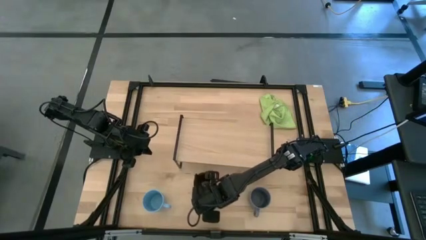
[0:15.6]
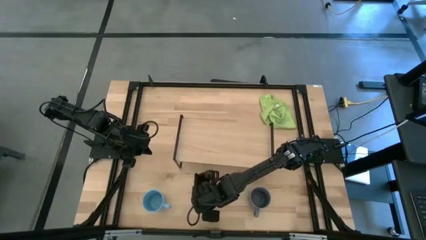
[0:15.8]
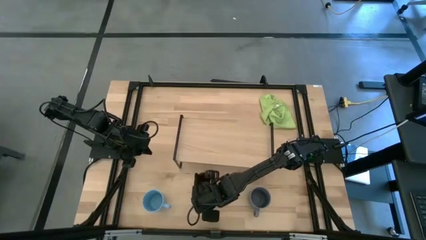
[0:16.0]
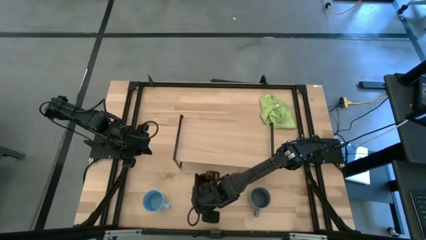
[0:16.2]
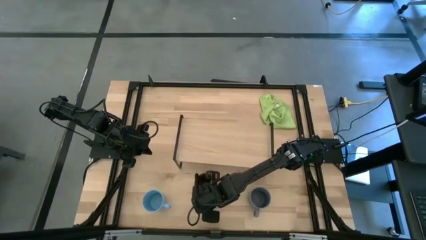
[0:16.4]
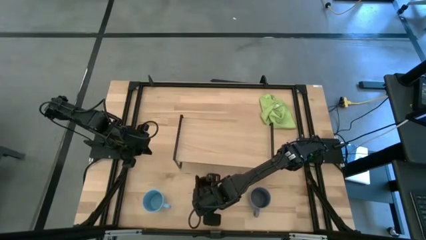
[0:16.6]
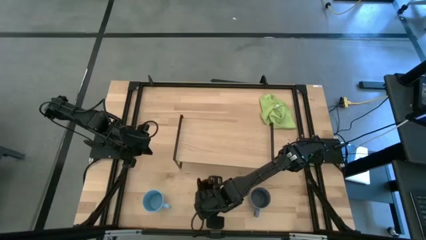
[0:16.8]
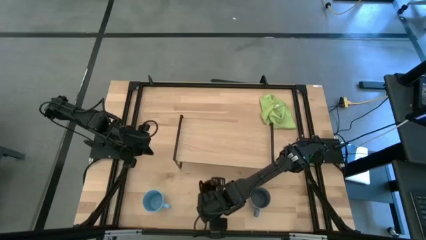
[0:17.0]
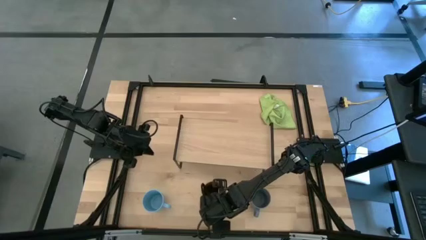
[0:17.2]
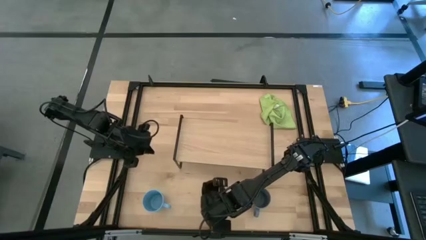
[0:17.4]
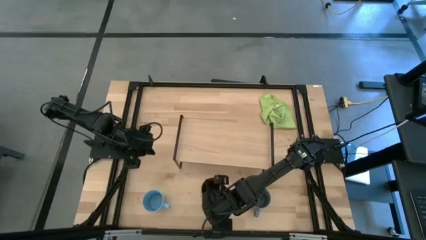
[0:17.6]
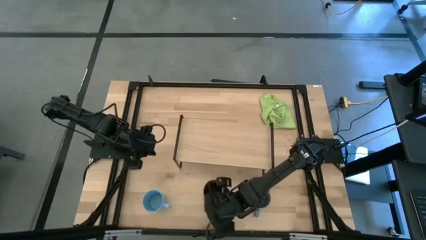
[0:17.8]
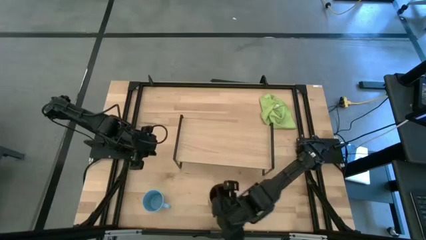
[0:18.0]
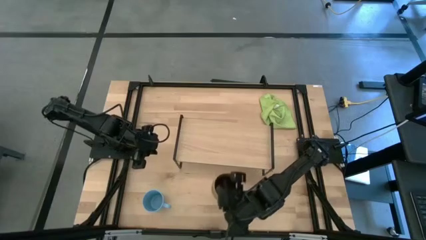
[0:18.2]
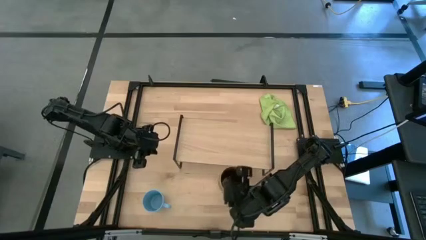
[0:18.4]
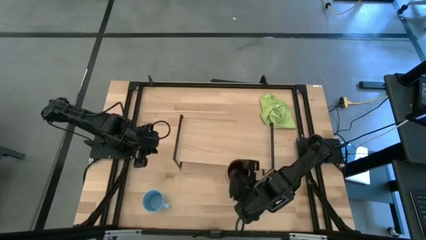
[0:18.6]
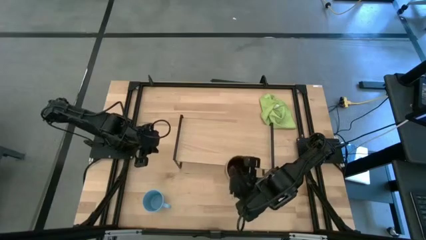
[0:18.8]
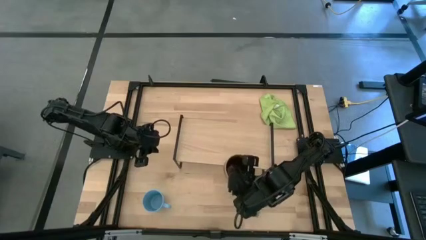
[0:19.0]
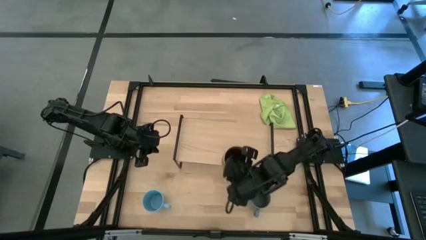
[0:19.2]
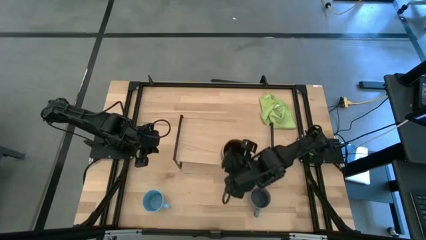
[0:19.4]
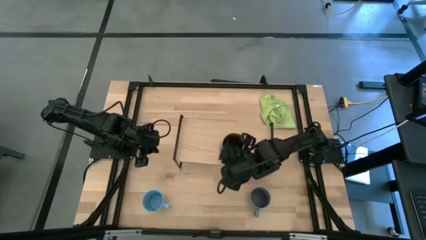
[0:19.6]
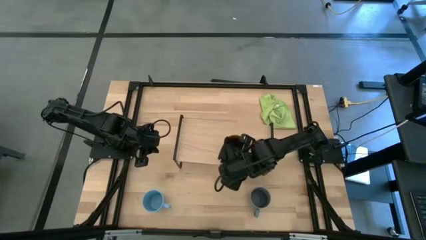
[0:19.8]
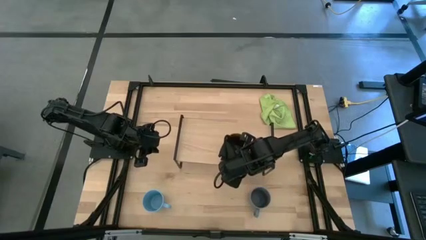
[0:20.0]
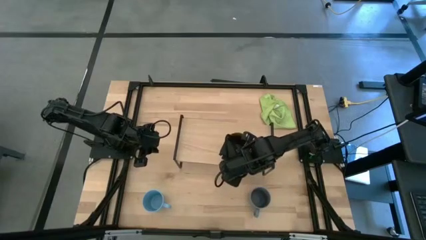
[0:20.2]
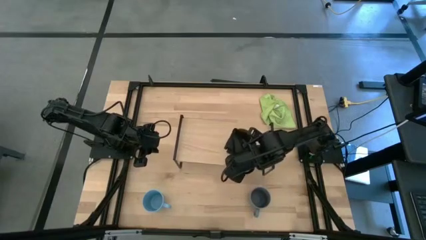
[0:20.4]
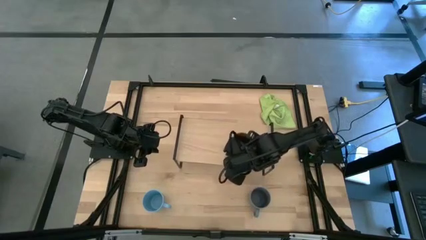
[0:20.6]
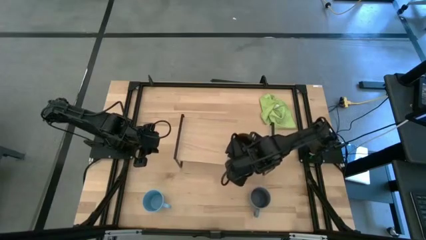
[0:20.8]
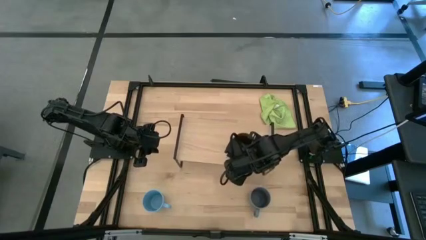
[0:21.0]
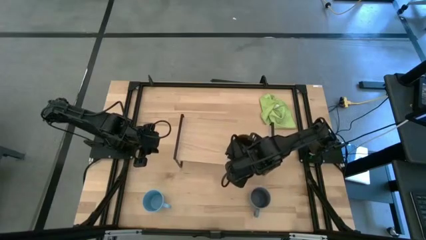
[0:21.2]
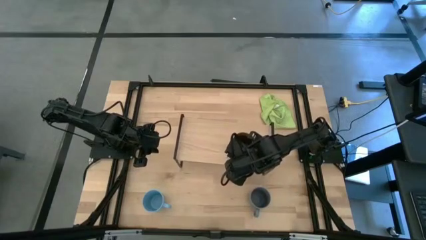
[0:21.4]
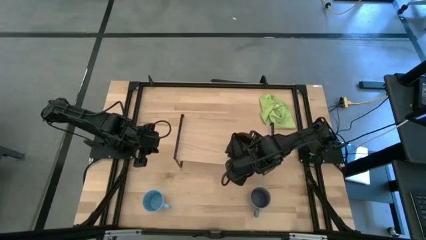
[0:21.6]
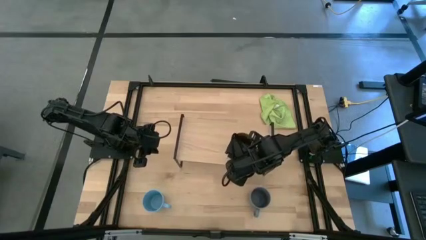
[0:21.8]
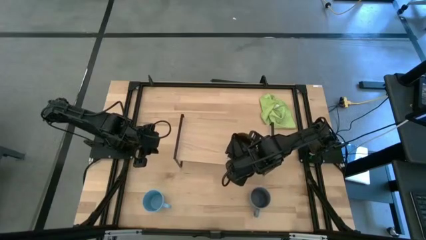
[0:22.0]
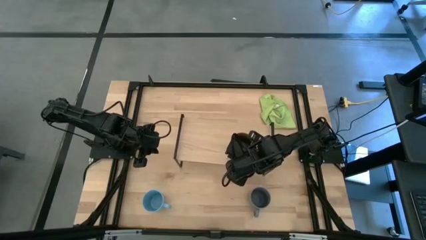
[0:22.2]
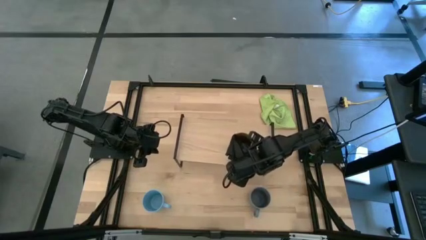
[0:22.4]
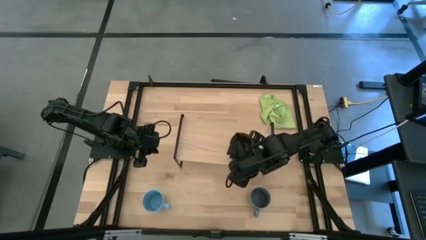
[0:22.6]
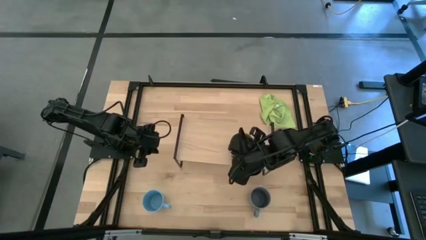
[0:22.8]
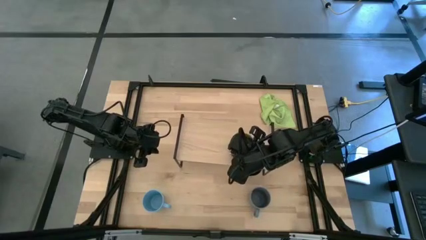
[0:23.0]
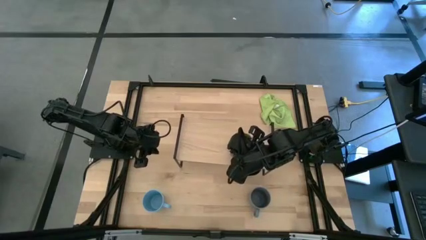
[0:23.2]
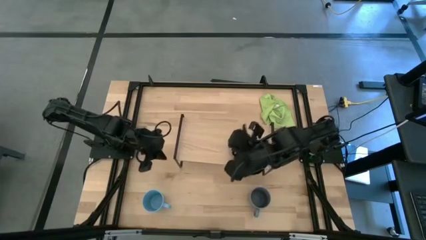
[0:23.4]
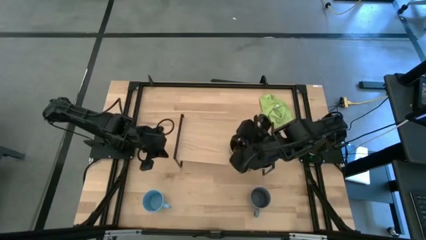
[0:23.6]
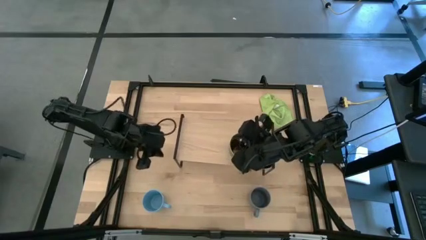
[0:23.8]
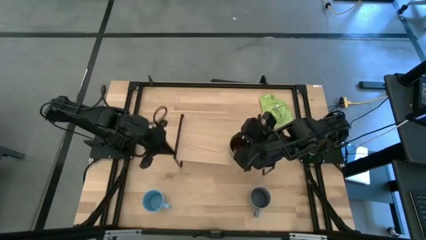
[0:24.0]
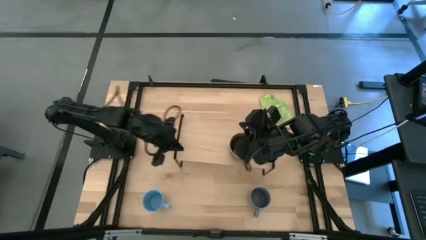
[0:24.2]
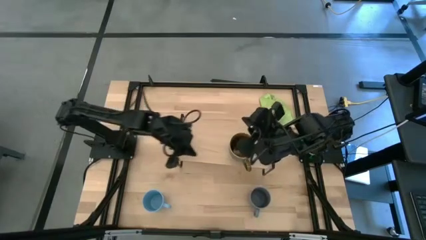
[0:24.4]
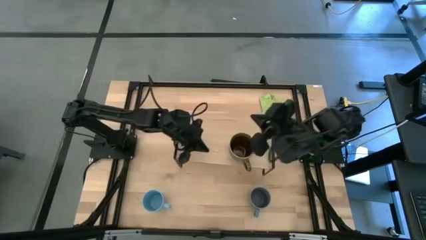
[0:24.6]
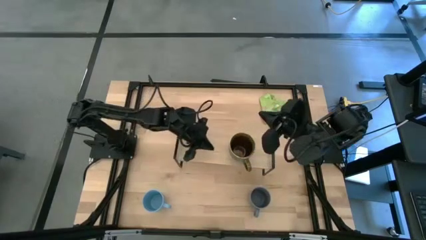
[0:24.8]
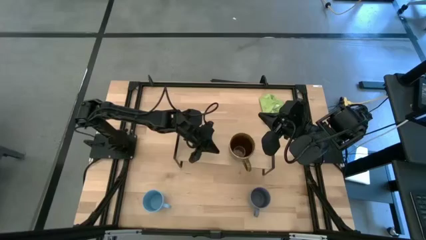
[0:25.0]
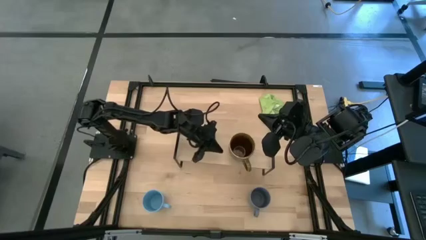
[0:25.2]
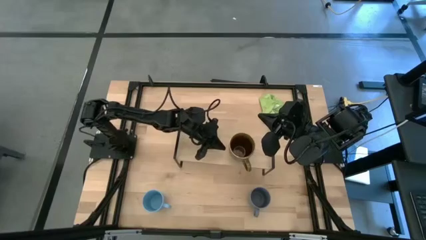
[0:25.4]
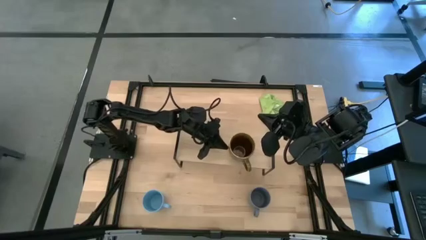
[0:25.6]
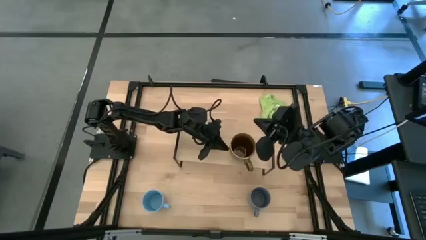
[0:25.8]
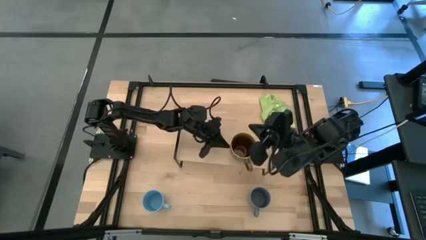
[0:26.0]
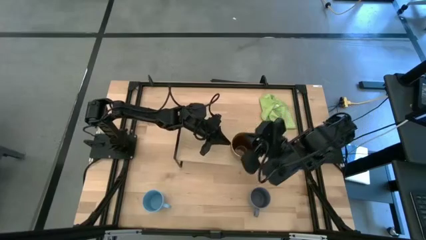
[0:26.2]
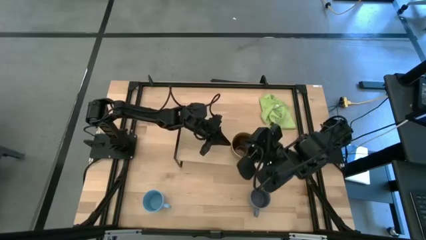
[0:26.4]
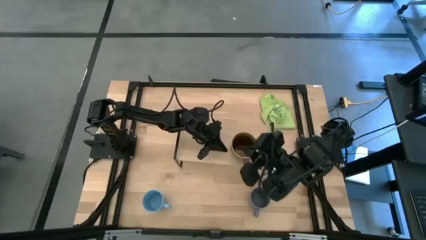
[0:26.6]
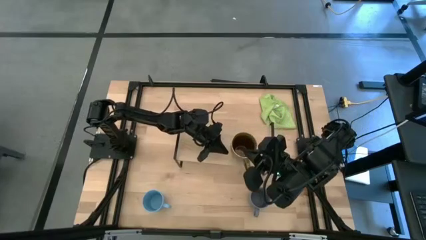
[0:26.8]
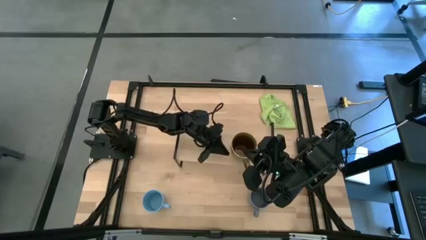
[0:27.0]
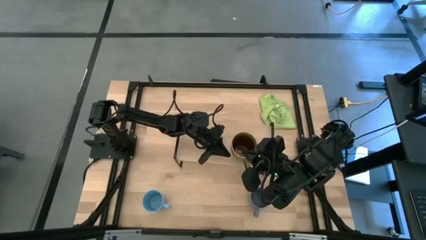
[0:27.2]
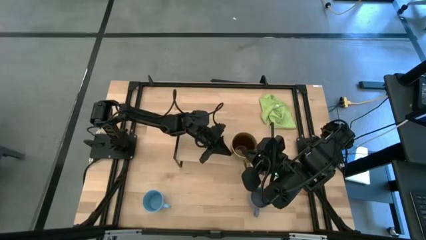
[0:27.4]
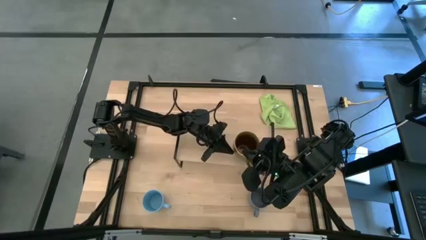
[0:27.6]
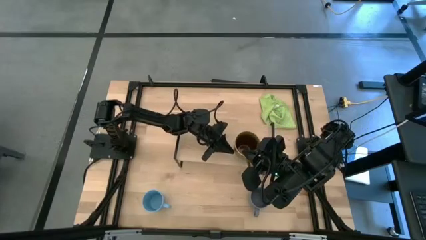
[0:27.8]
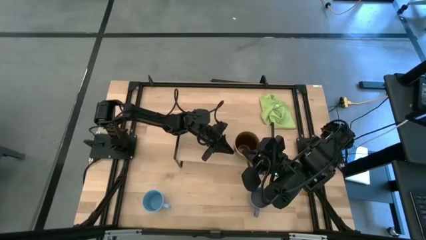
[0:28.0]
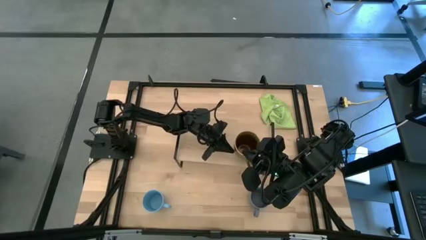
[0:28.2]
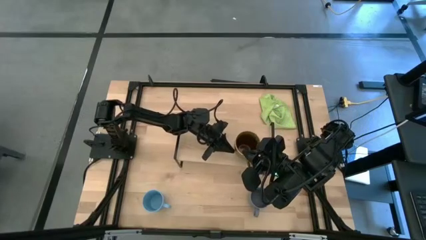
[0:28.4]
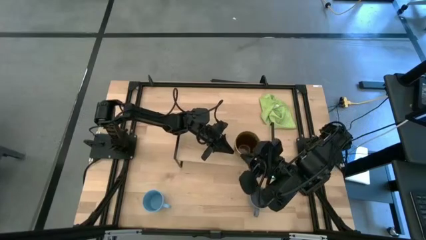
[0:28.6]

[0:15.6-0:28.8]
Task: Stack small to large cups/mugs on shelf
Put the green mug on the shelf

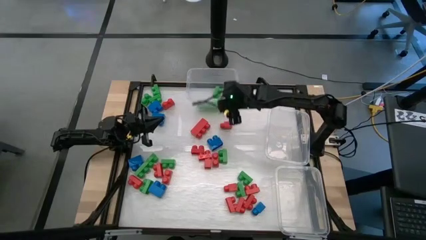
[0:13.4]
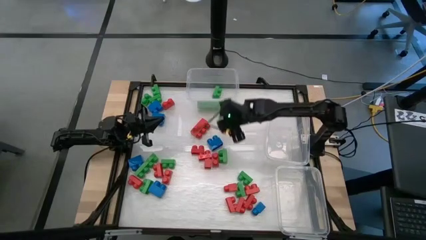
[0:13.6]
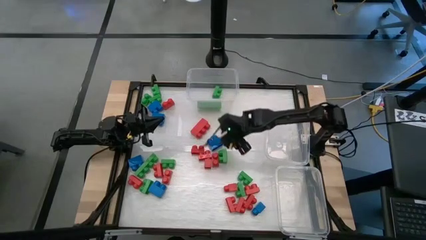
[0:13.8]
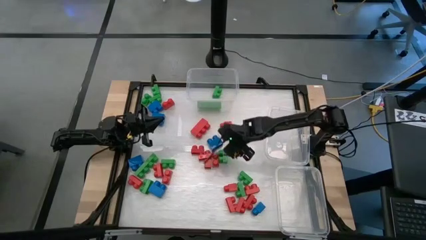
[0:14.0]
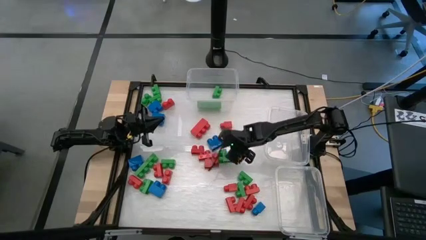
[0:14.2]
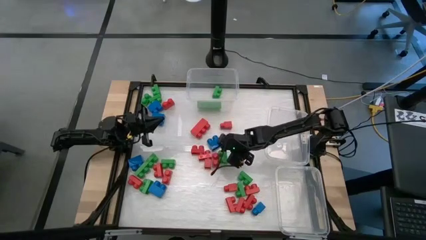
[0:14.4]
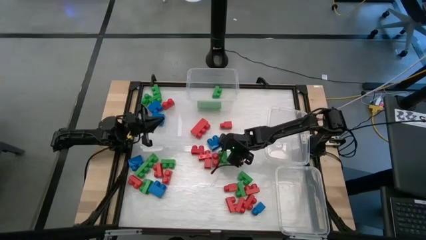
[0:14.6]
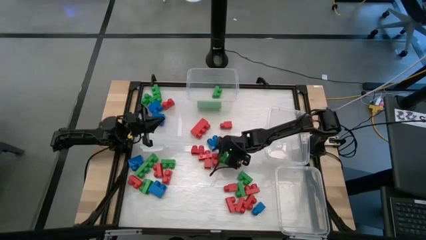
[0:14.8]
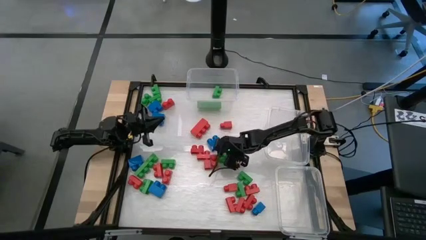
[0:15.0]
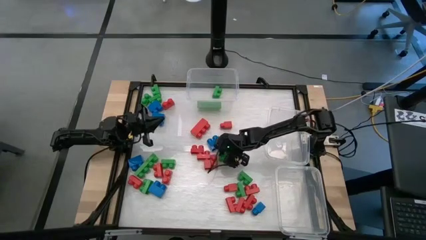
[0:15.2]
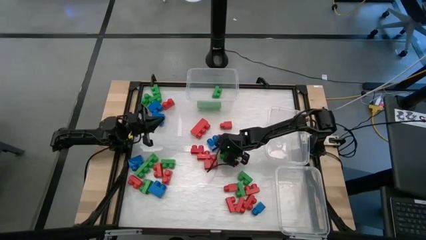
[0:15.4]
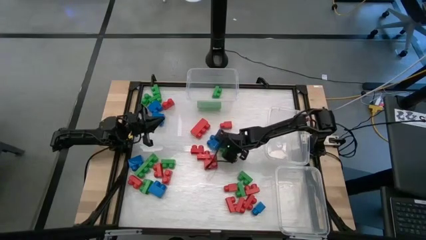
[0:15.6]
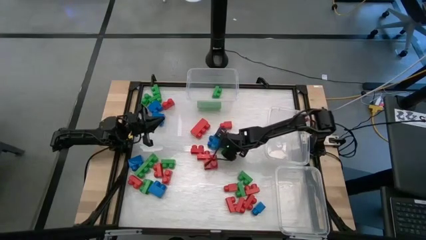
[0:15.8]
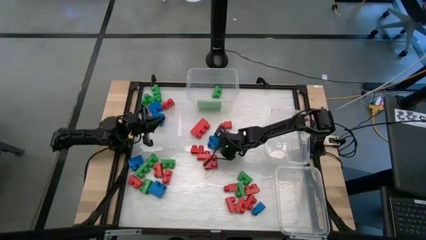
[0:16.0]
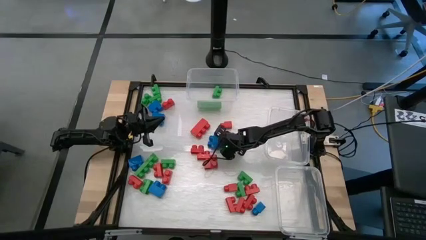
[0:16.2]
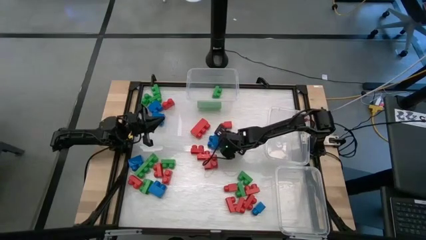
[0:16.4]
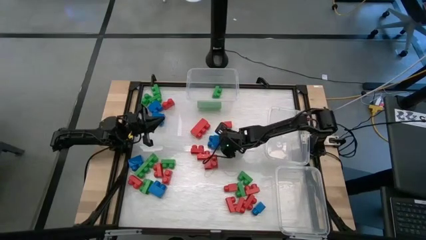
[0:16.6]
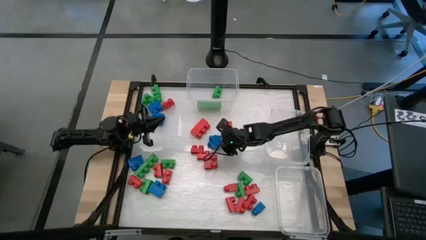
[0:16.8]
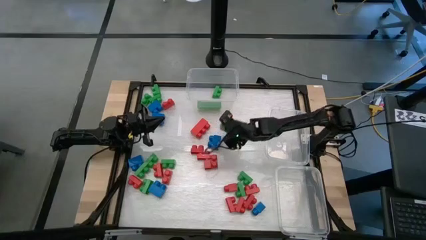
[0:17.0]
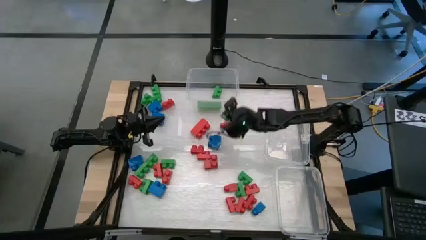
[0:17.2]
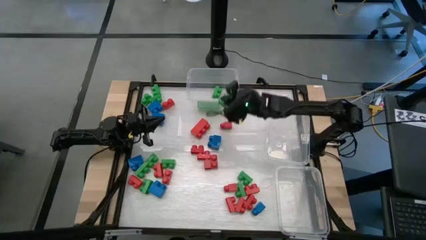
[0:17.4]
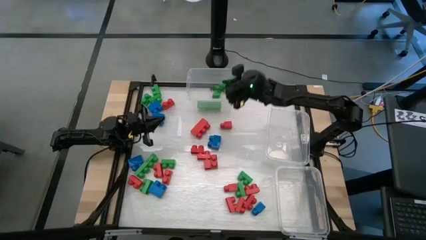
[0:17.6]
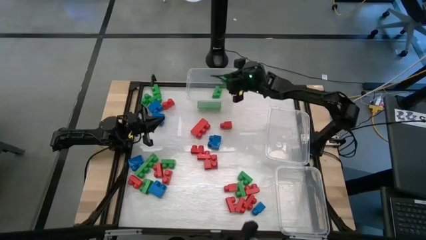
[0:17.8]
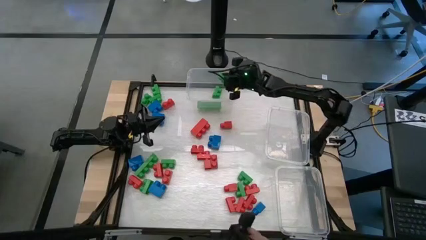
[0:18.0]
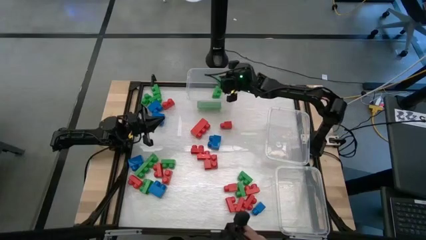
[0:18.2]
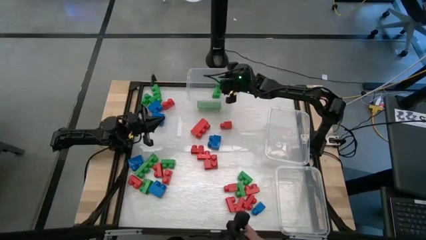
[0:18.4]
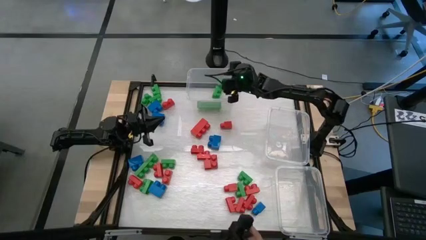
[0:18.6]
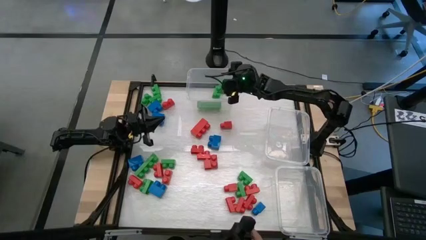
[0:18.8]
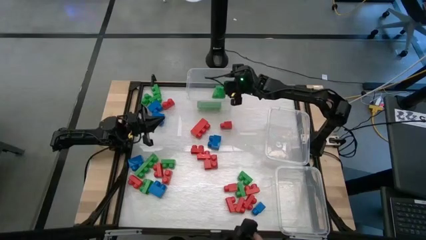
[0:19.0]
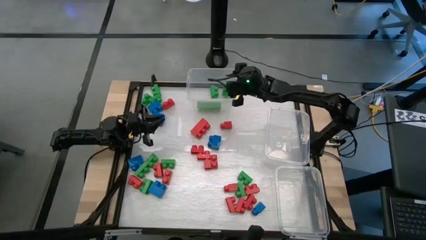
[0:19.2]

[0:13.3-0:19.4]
Task: Sort blocks
Put the green game piece into the top transparent bin
